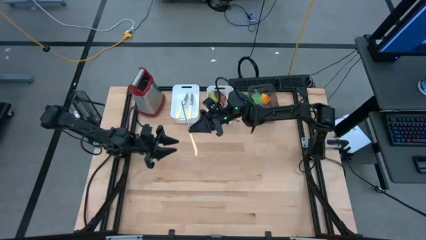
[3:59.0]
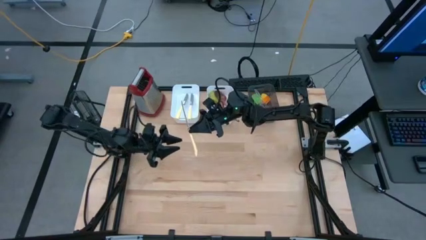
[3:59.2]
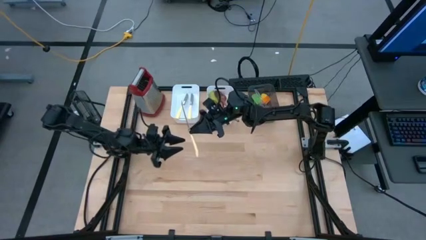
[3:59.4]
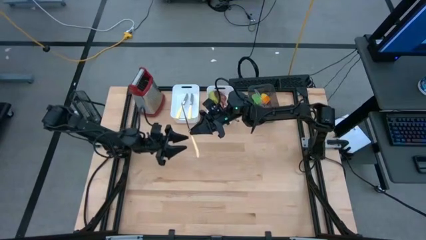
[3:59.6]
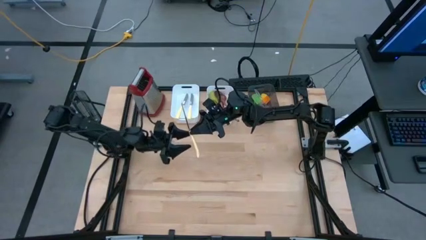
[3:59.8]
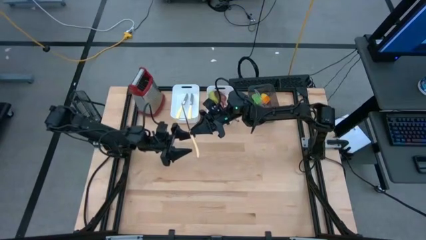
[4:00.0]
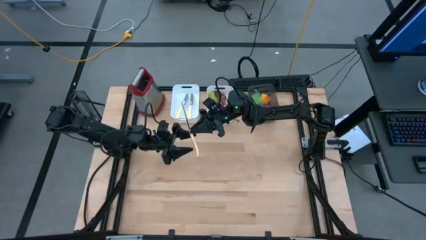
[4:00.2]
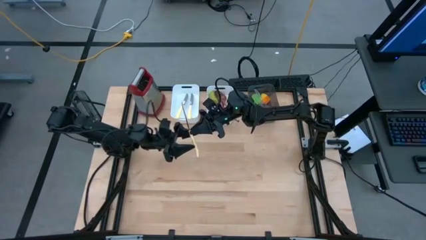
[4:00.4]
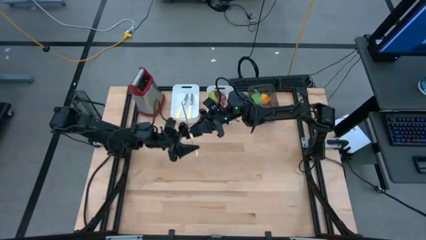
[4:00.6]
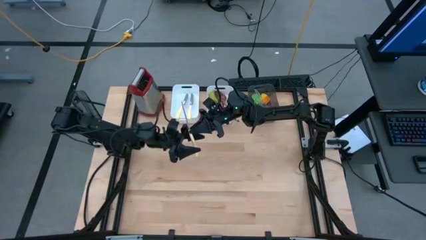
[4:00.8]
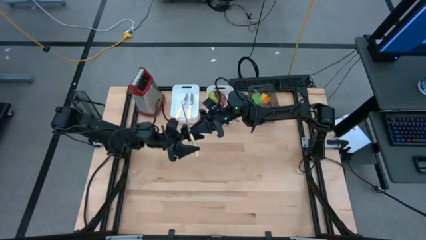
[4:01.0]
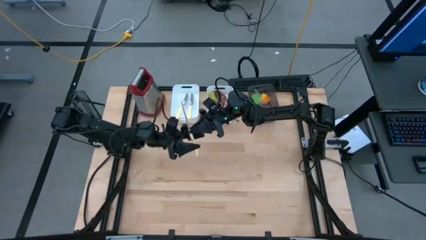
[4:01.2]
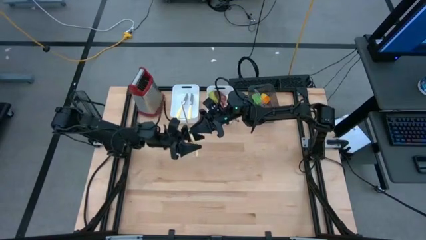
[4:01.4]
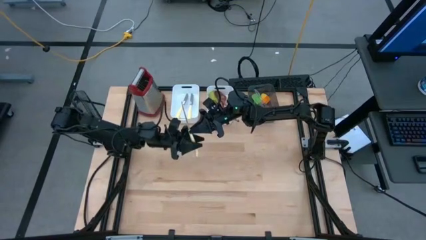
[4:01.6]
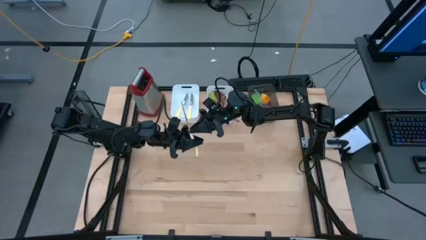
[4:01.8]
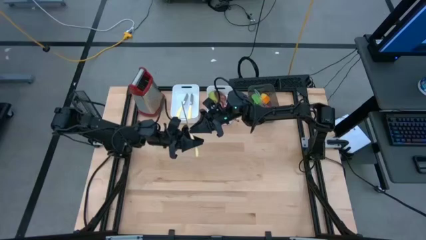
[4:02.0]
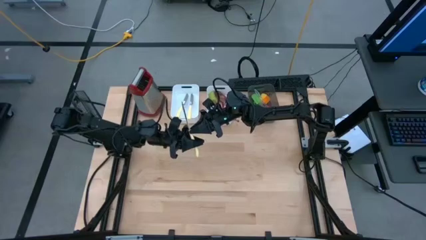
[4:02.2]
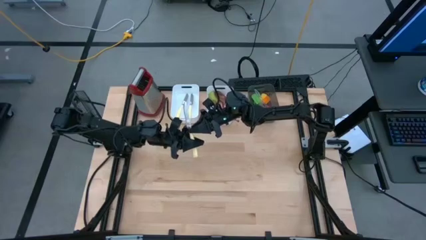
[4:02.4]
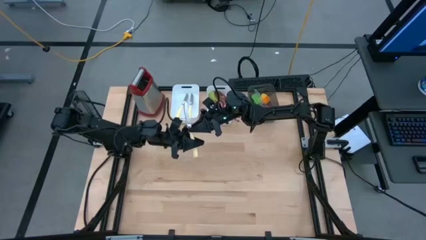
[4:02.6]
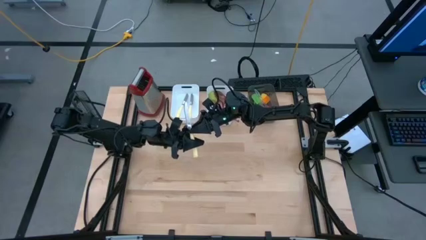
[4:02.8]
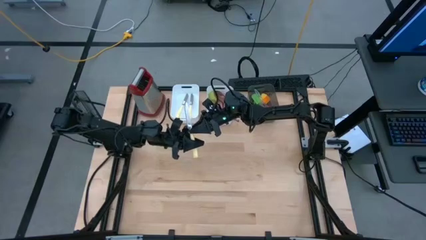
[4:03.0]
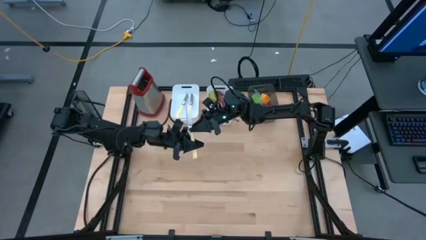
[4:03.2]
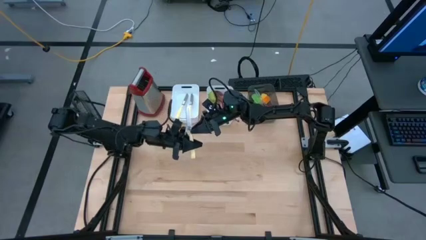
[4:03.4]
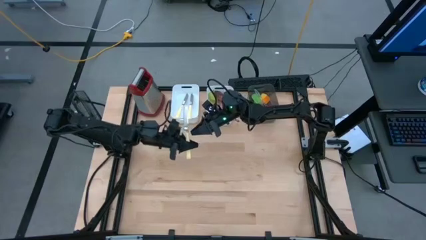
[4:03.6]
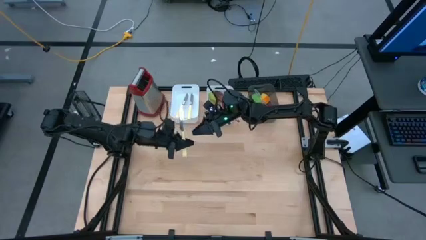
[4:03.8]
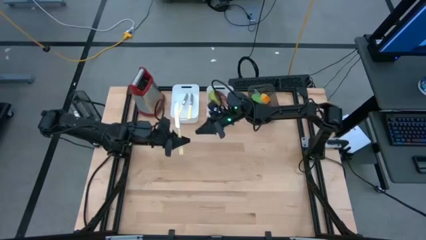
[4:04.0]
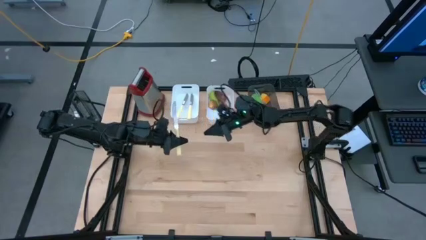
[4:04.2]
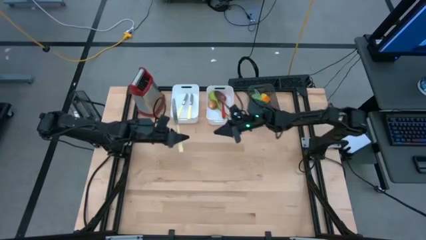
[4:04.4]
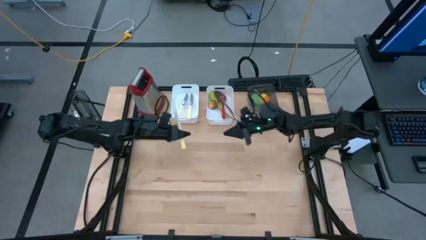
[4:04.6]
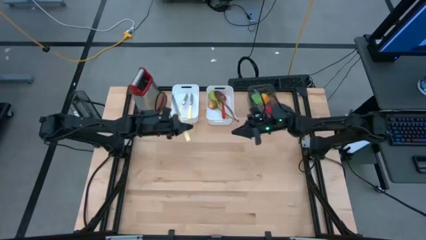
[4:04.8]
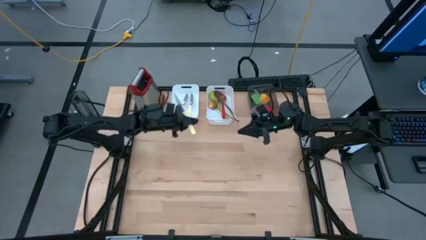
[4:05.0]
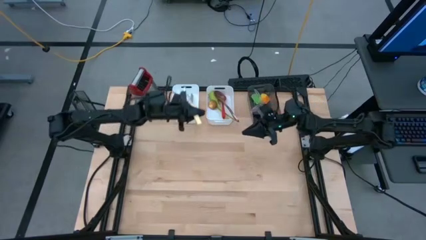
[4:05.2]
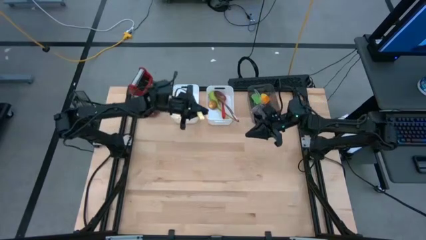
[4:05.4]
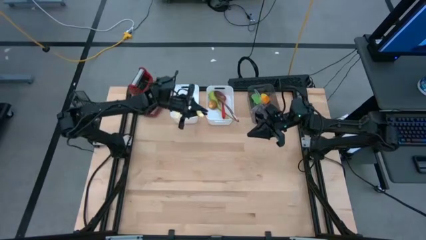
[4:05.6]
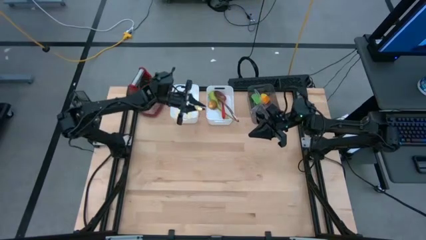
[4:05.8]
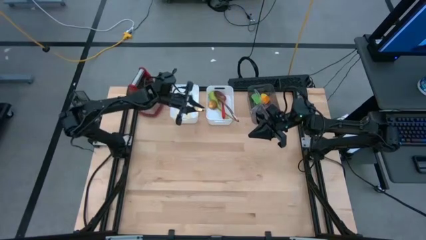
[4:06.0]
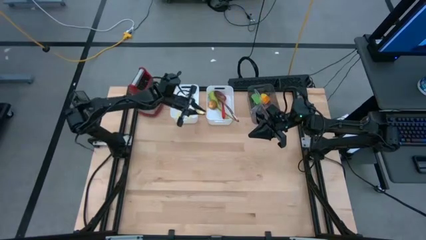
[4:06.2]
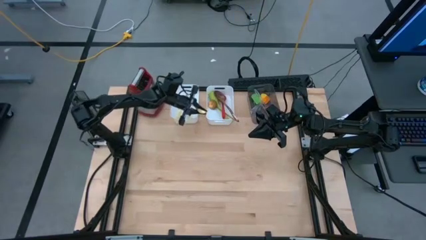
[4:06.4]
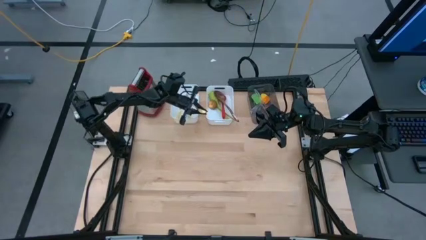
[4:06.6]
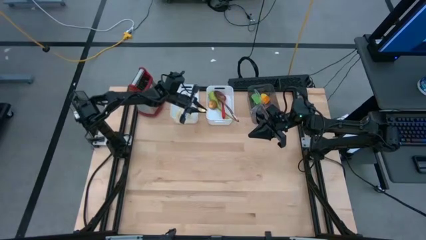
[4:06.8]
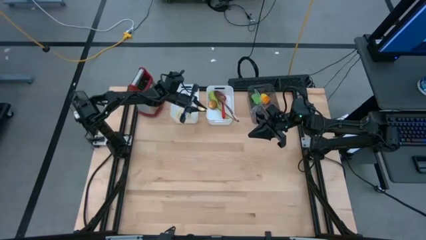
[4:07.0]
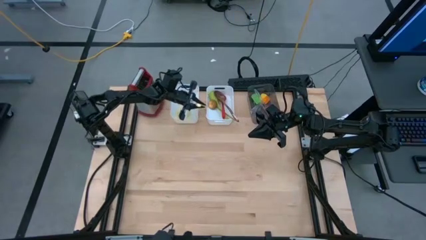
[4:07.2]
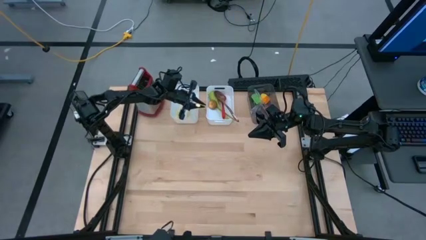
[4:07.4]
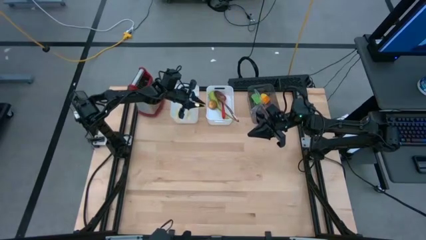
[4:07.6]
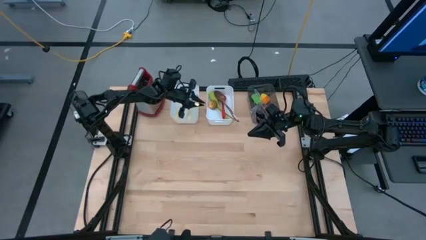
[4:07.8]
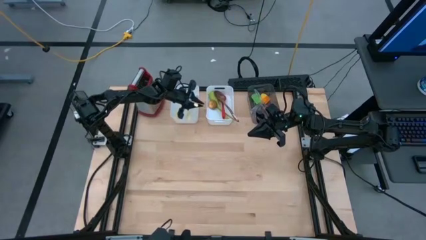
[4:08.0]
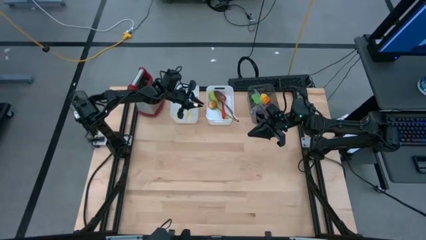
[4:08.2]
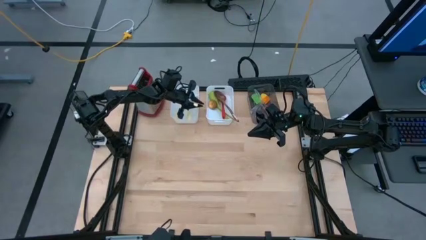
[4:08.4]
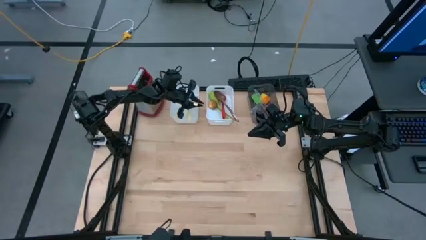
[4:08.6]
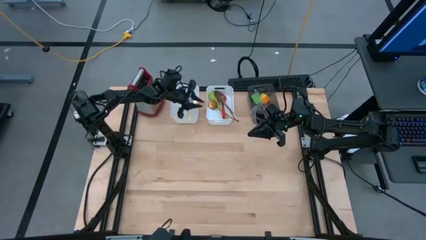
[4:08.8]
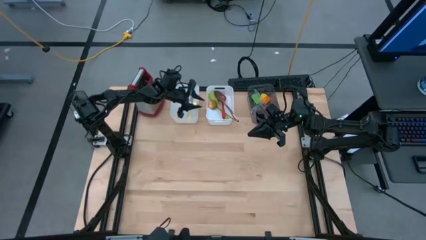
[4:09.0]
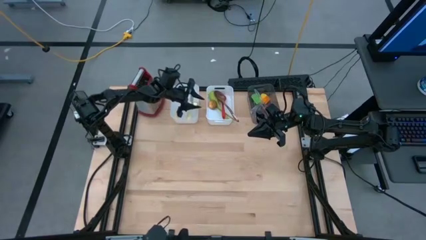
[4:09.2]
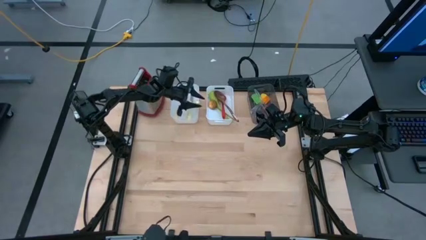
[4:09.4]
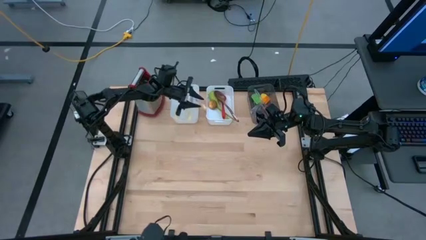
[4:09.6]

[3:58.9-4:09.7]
Task: Pick & Place Kitchen Items
Put the yellow table knife into the left white bin

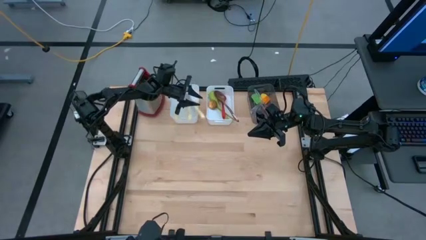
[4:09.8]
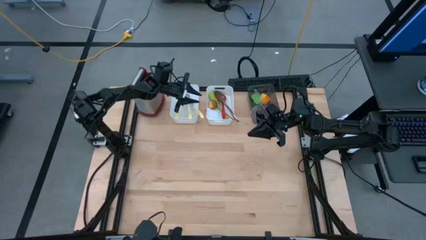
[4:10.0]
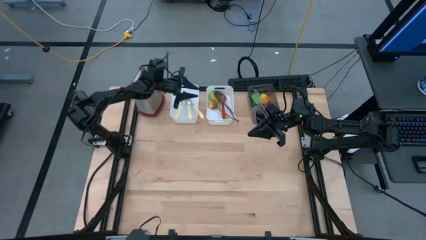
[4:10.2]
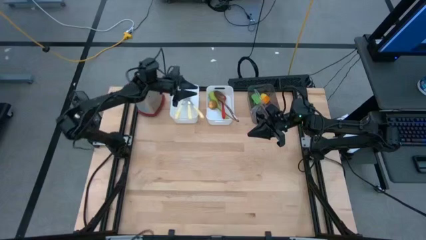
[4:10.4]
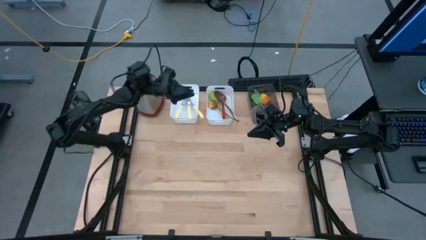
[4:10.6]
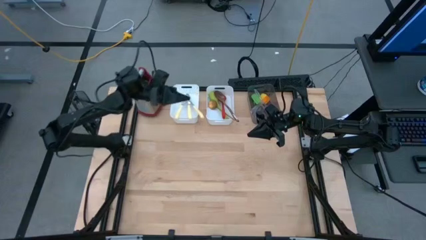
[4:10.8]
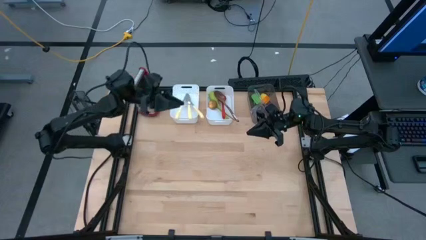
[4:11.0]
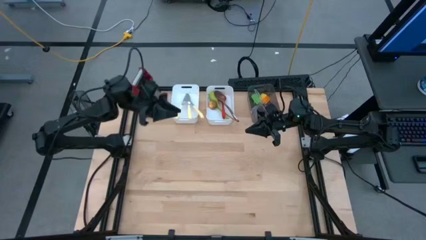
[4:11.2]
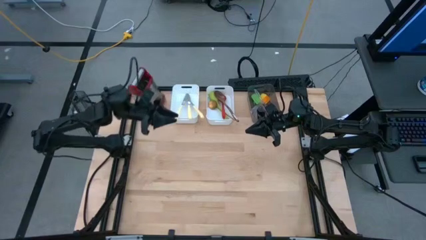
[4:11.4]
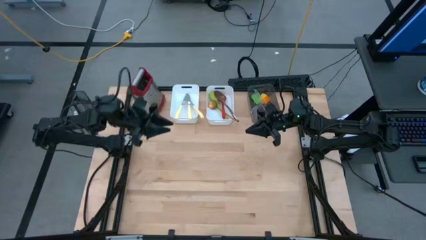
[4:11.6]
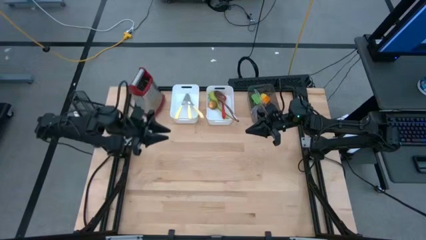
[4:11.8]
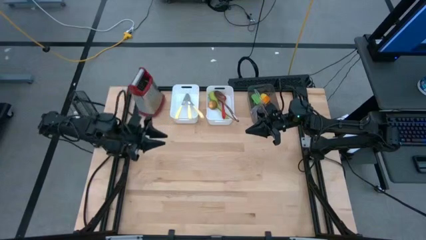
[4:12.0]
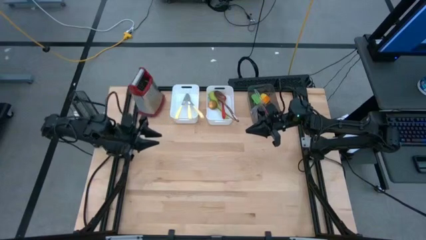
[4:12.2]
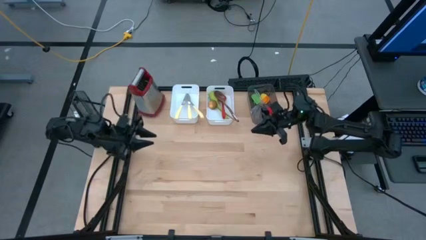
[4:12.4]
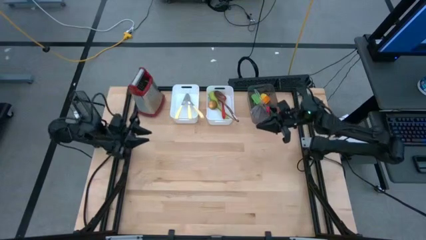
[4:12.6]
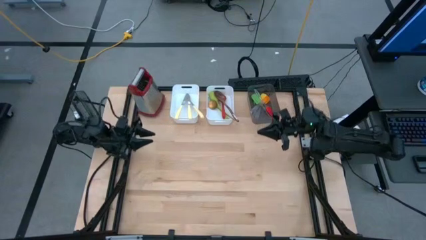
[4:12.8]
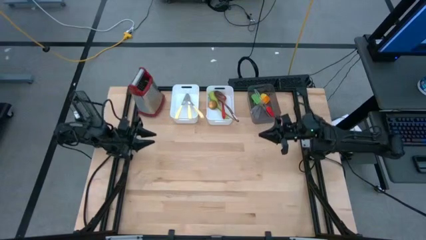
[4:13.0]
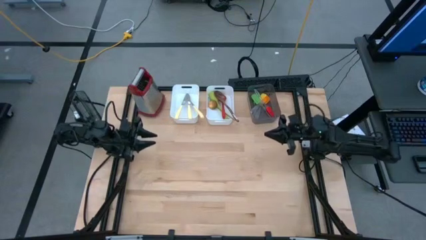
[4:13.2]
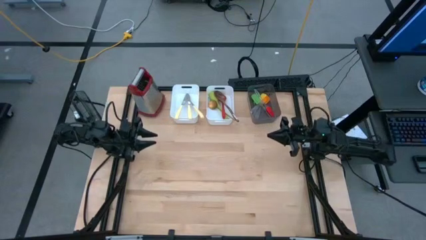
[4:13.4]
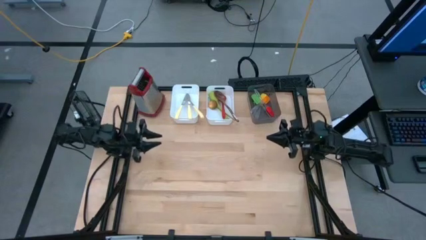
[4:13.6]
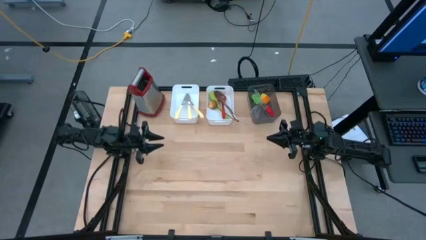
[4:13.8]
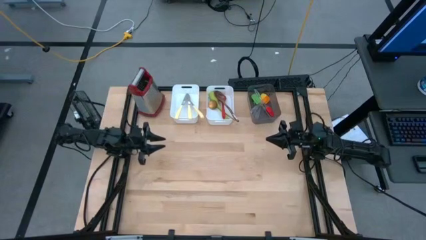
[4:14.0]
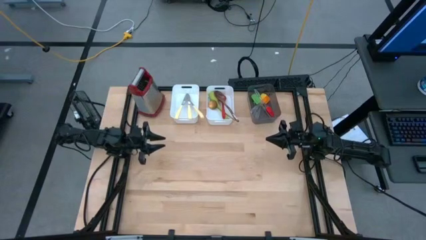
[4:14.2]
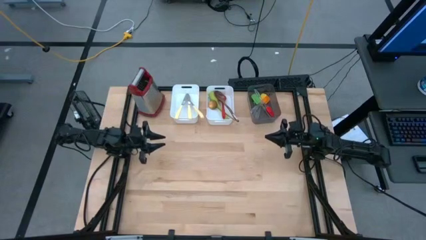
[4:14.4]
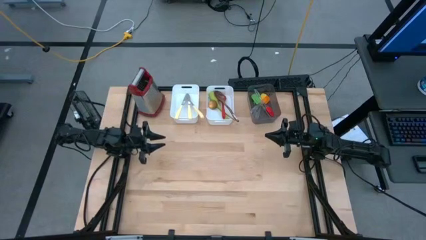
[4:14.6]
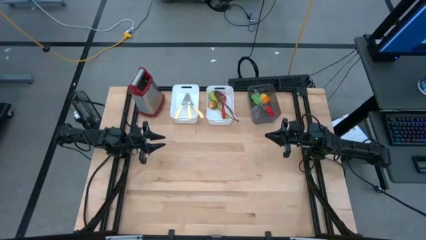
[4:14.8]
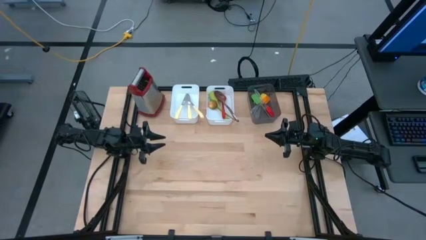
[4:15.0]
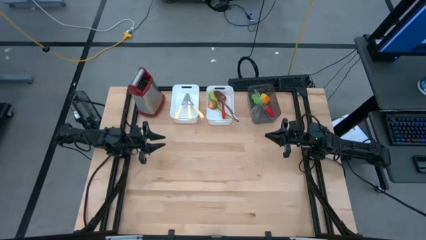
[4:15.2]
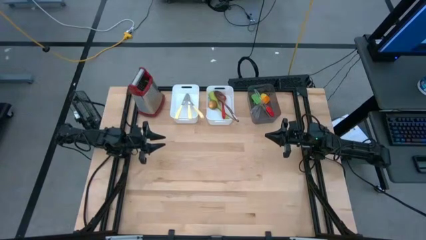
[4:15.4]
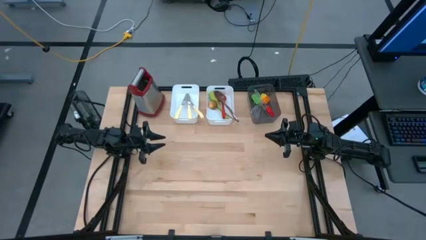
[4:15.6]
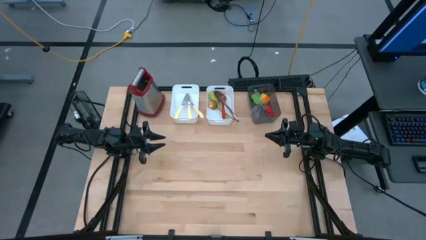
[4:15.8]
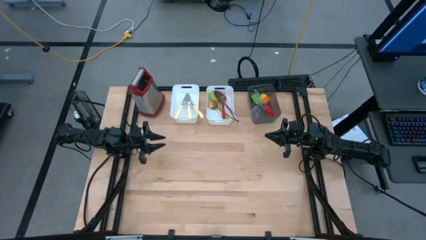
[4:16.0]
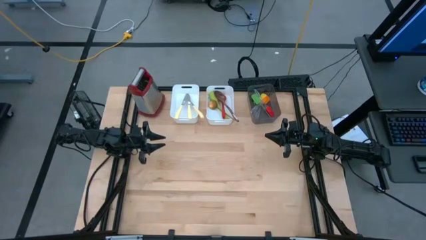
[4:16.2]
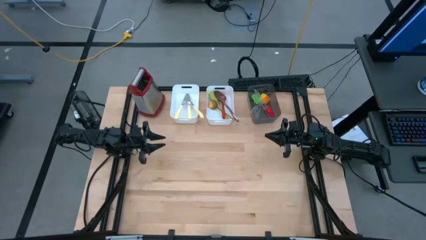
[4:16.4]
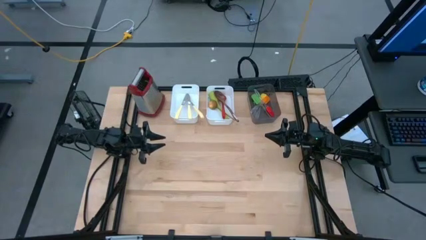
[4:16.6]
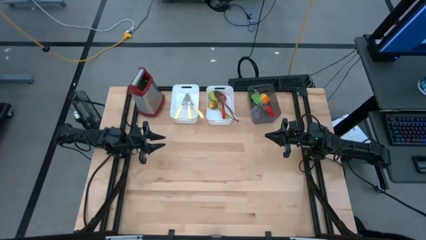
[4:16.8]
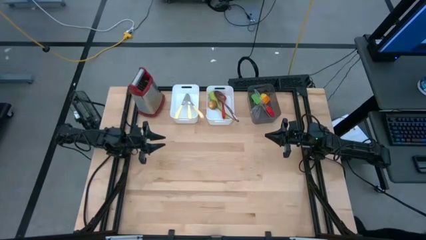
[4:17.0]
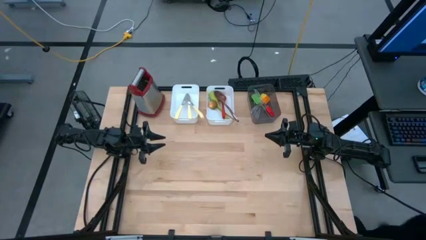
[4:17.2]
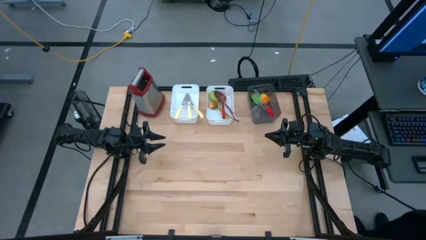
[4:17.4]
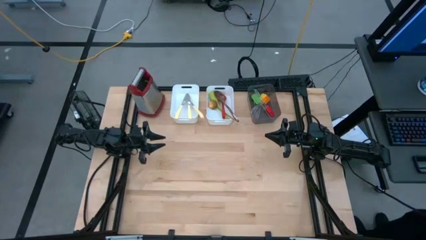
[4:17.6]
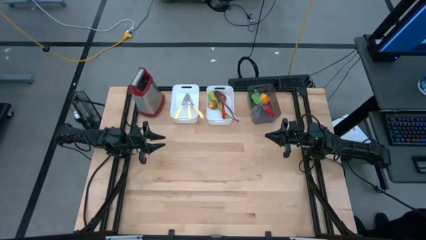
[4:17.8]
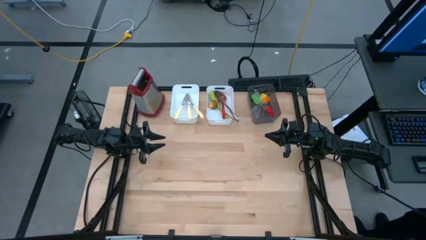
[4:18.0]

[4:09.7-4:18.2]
Return to Home Position
